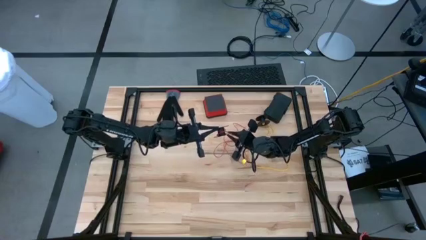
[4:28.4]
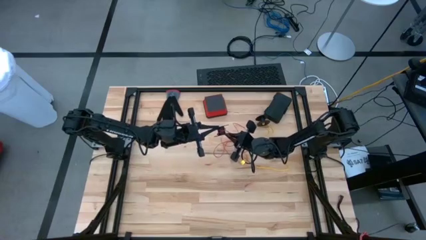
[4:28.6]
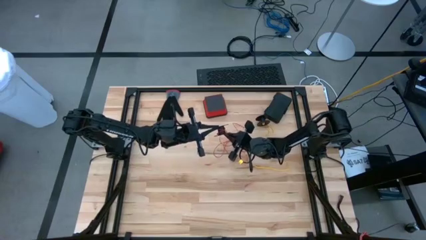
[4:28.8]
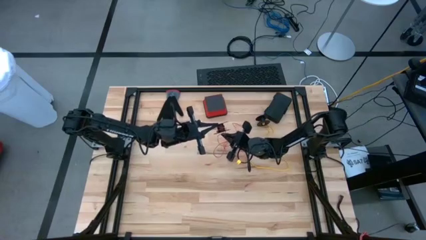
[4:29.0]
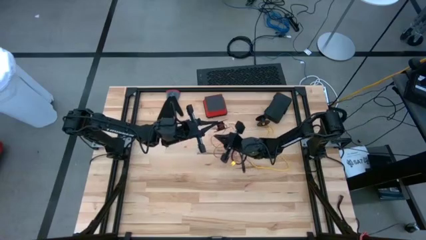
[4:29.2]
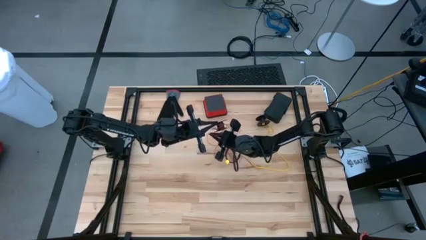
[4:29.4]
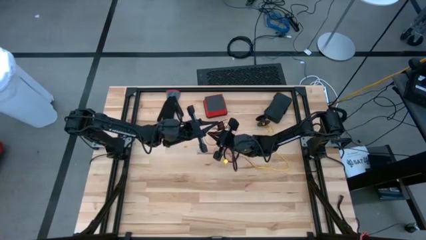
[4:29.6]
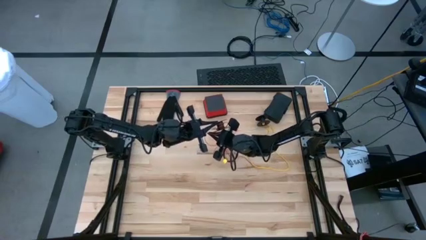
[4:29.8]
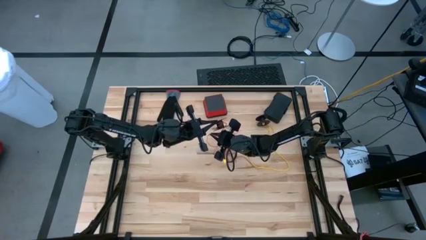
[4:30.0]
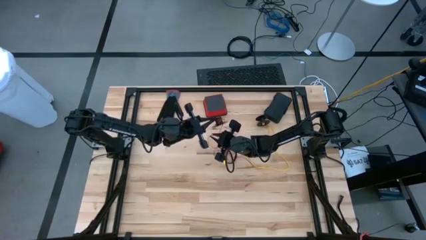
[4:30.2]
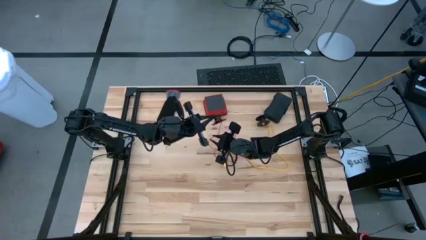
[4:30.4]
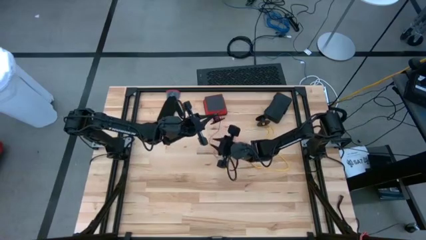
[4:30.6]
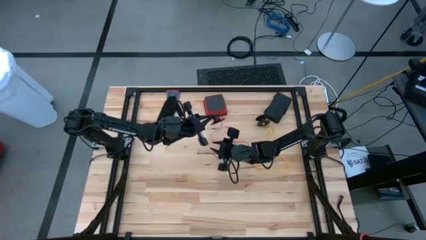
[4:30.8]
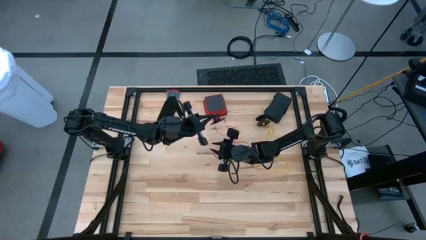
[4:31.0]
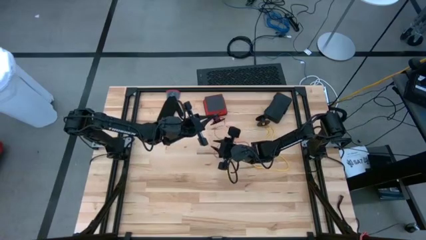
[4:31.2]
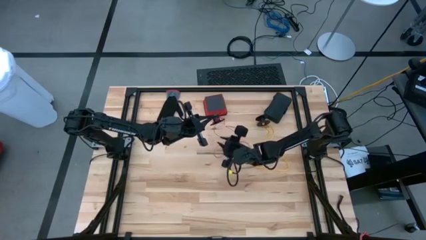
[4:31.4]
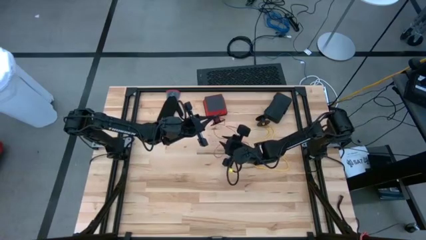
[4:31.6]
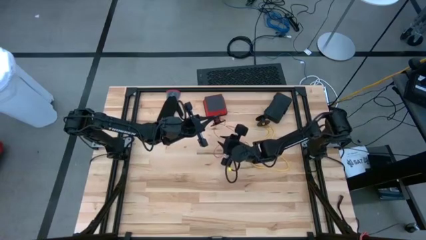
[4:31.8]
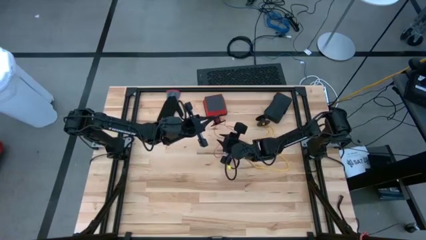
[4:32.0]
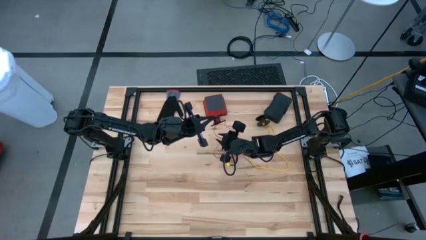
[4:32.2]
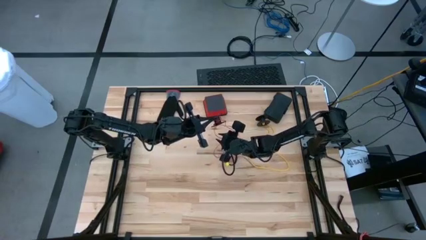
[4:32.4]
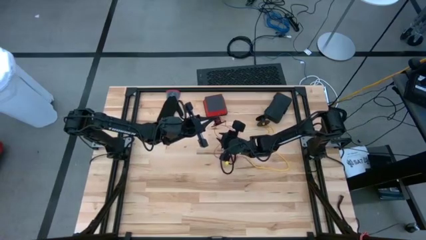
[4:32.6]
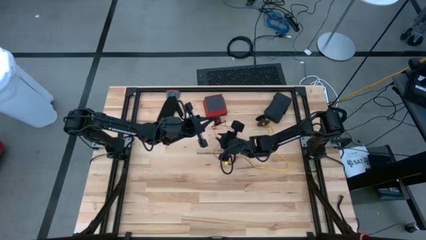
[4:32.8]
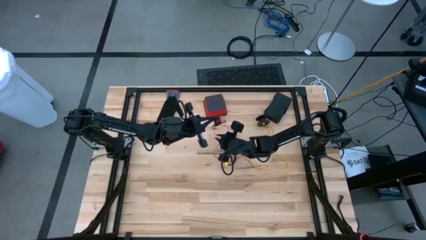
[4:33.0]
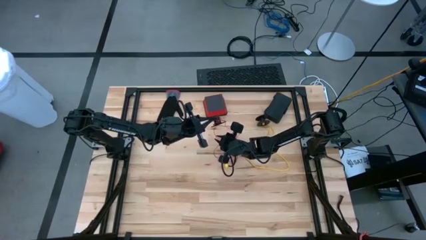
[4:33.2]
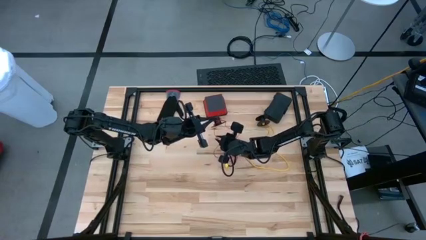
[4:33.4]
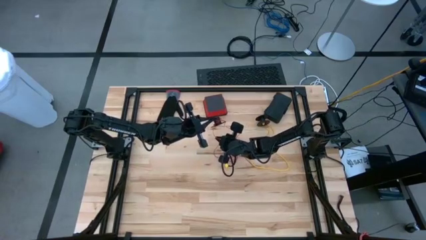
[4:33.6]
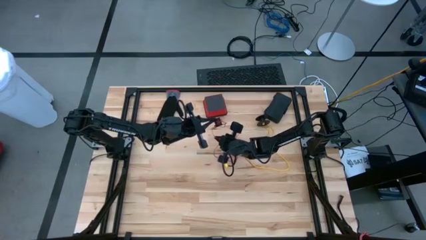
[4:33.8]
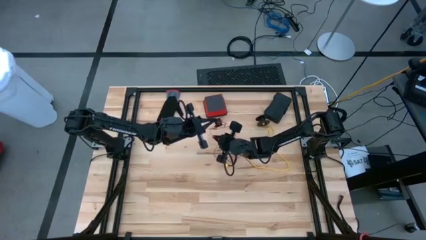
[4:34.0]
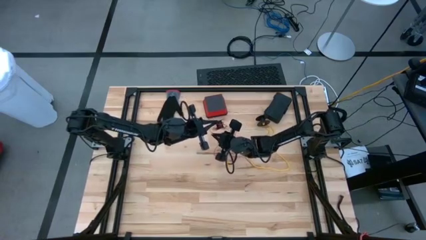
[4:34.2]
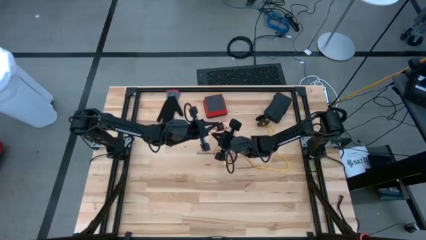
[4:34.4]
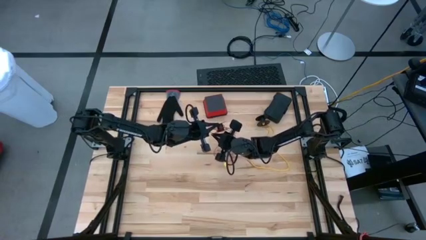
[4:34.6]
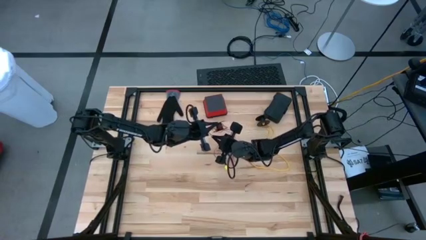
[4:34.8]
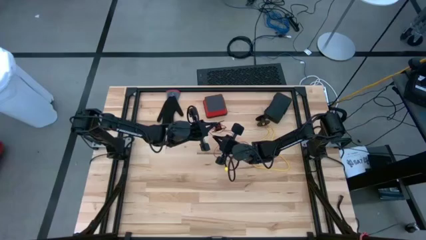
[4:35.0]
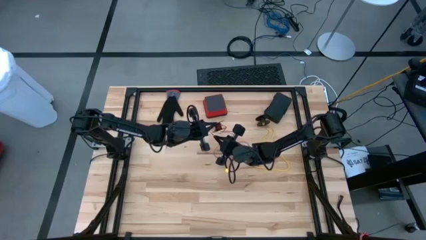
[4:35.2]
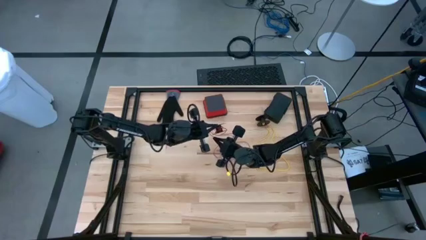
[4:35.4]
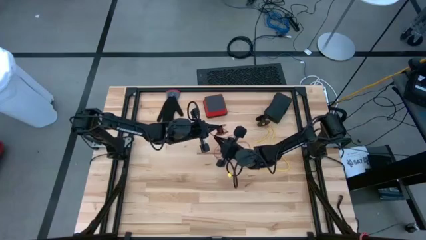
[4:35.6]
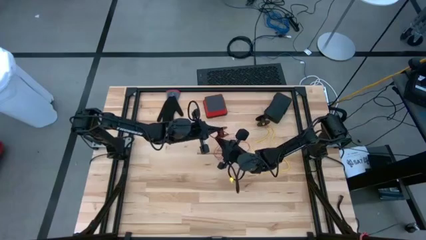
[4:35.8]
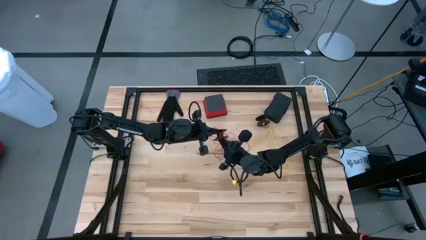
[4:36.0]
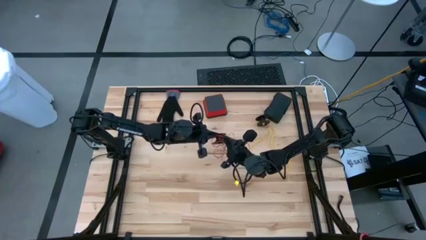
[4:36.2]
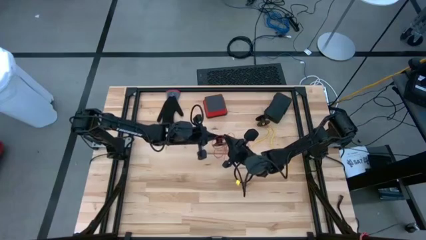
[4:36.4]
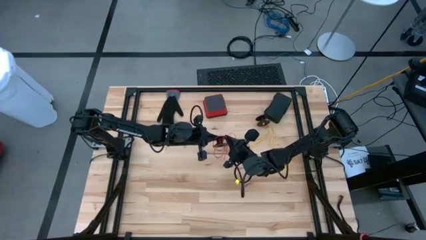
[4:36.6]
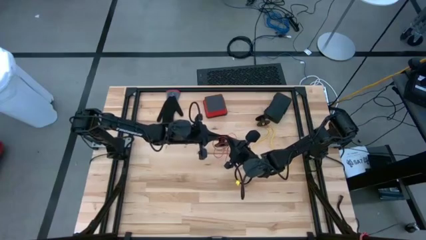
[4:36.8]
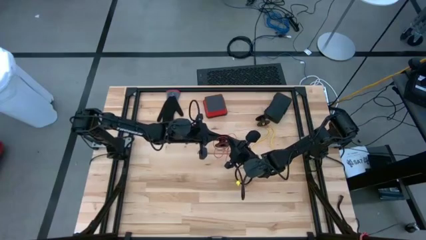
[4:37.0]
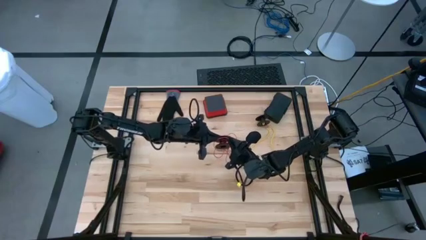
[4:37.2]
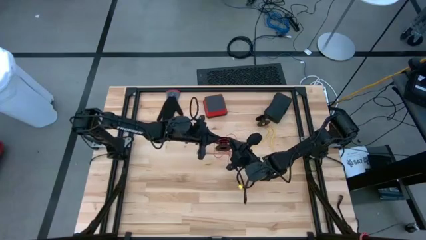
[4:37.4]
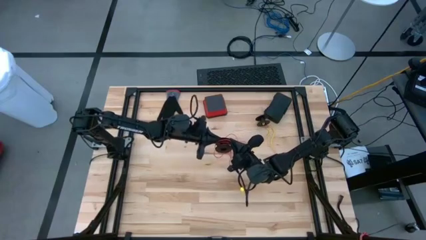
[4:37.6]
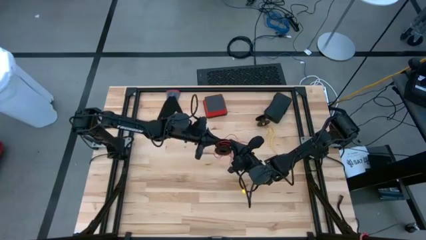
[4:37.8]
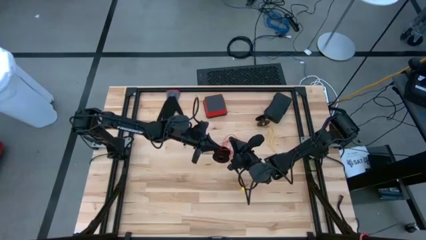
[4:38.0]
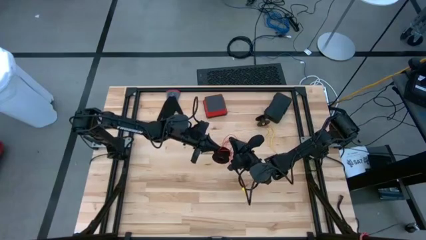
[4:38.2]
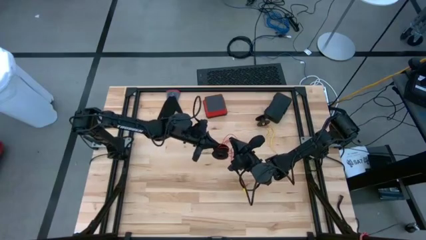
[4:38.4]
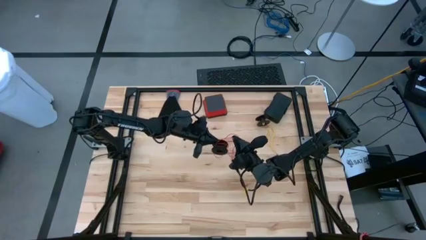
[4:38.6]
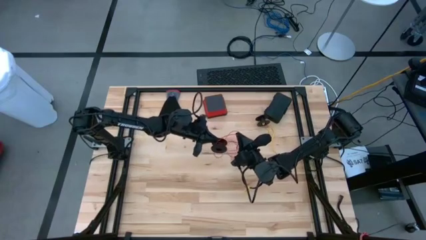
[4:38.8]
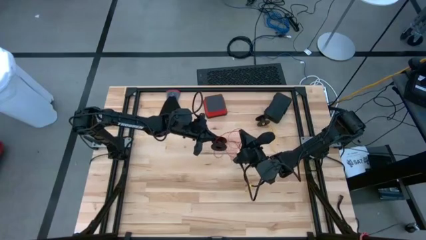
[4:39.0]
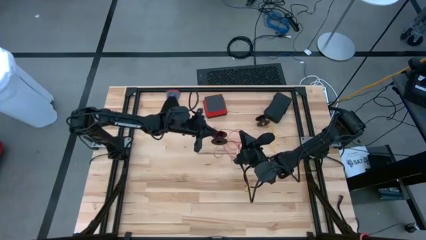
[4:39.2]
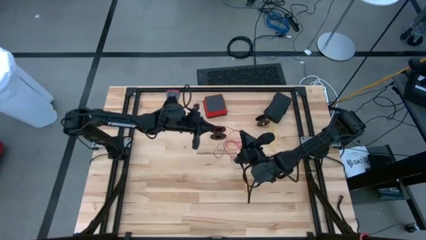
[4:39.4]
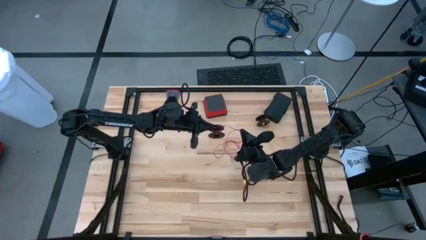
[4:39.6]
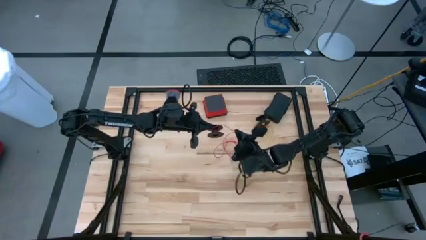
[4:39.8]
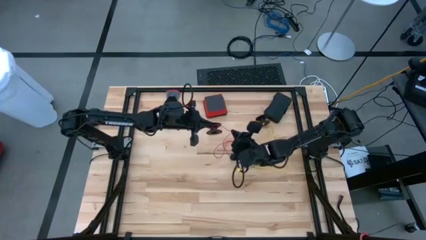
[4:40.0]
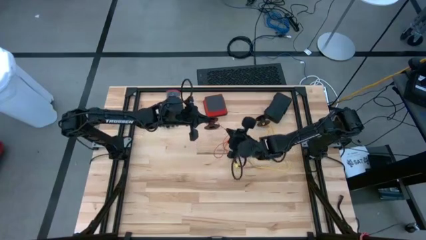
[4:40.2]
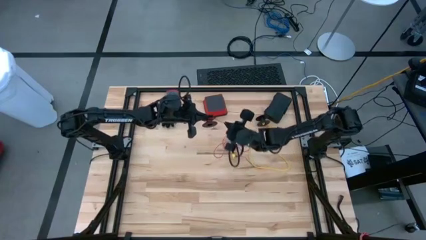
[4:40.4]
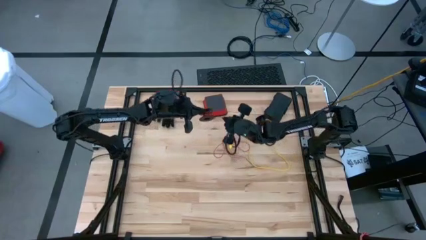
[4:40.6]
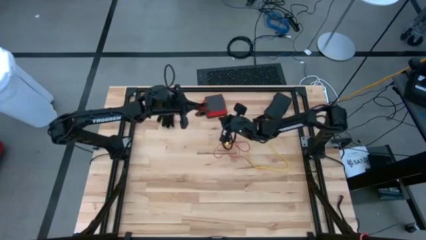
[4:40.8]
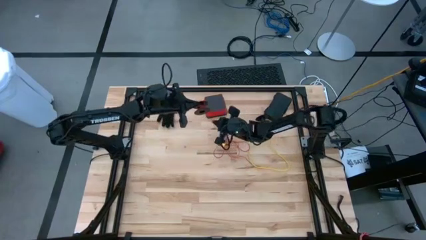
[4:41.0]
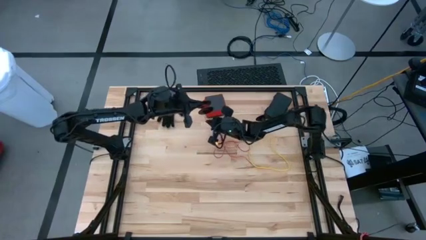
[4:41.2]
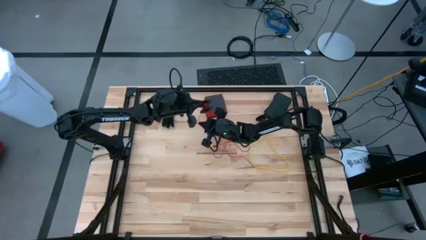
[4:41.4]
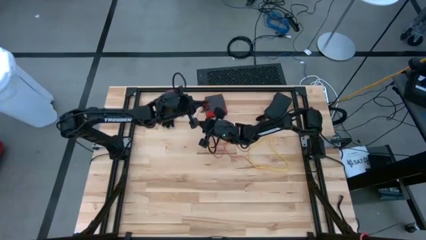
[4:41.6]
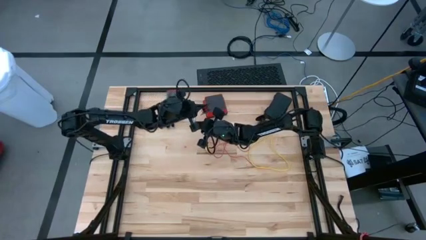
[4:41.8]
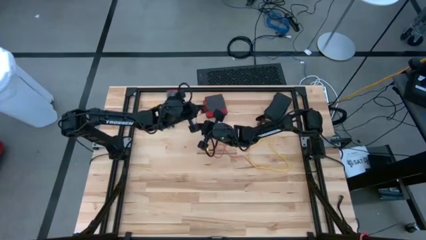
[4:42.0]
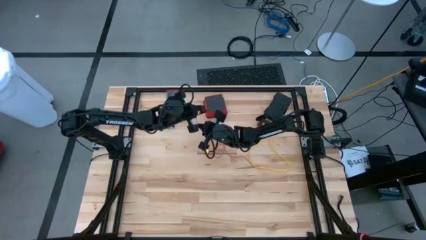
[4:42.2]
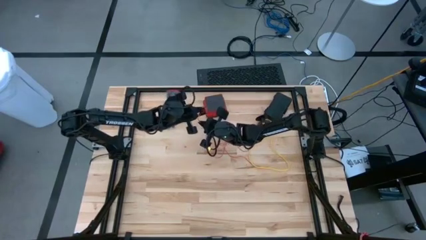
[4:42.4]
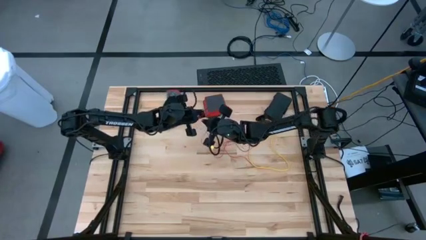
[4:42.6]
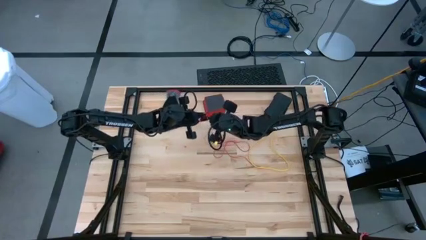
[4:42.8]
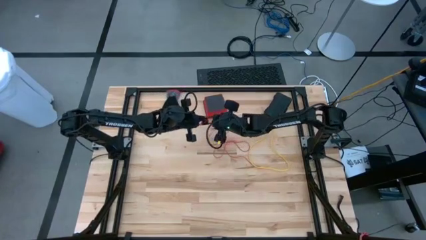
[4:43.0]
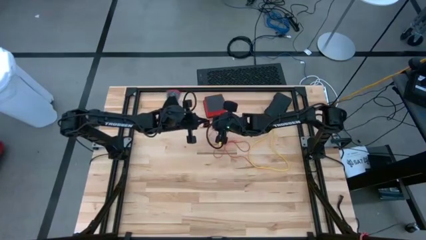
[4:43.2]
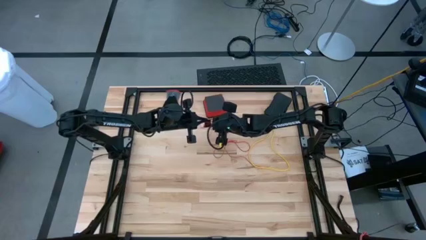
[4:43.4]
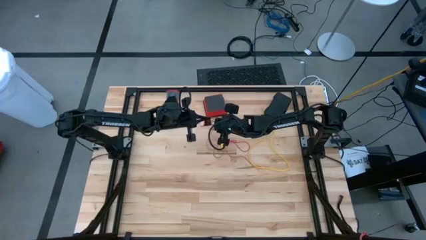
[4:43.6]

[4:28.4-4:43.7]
Task: Coil cords
Coil the red wire onto the spool
